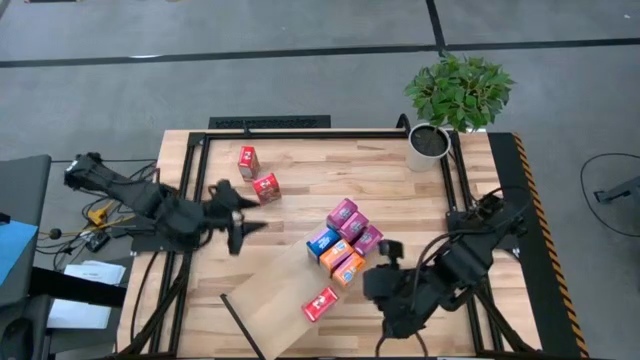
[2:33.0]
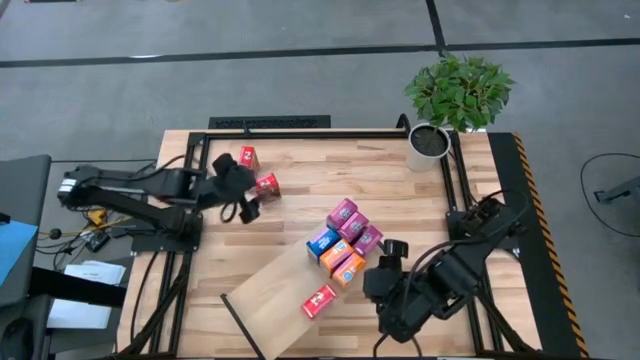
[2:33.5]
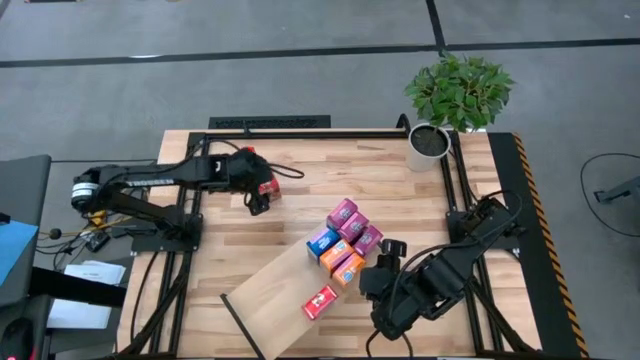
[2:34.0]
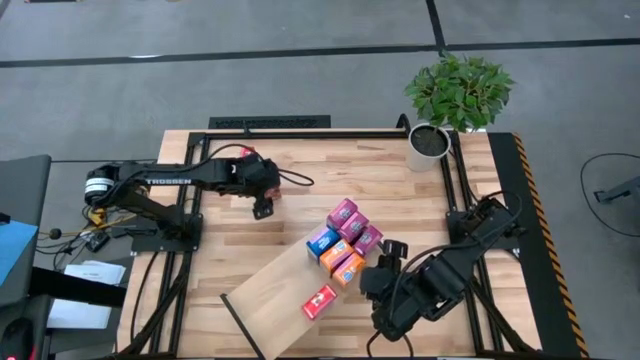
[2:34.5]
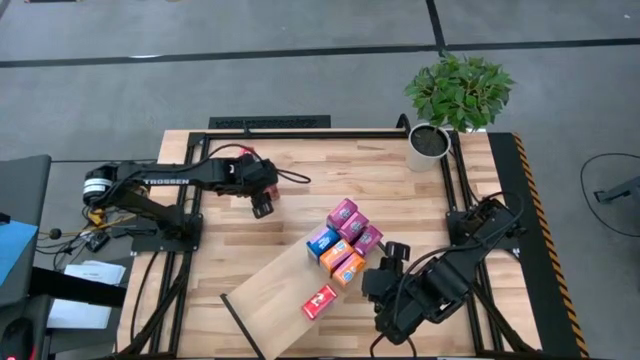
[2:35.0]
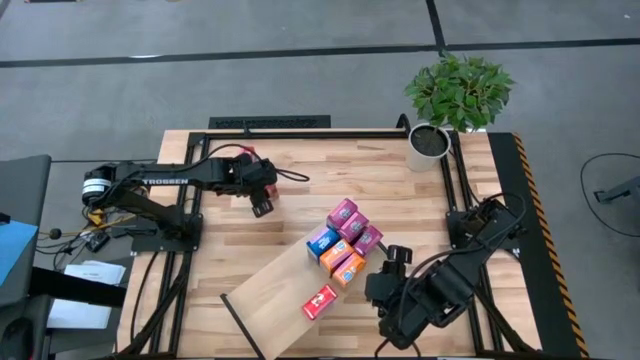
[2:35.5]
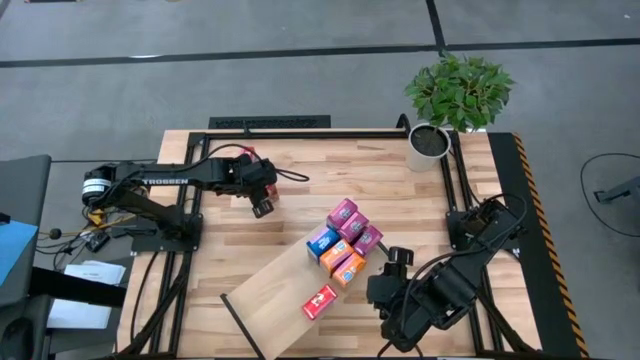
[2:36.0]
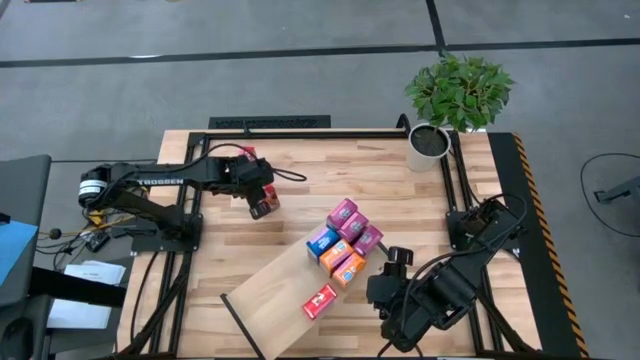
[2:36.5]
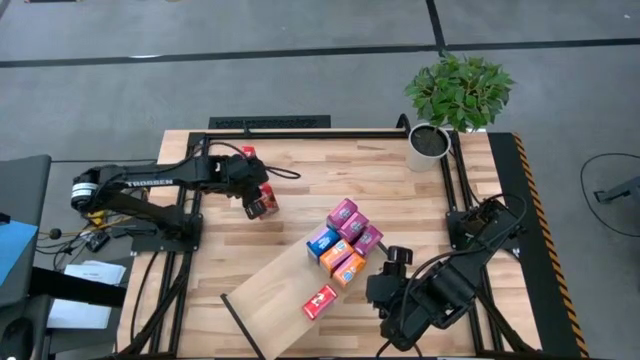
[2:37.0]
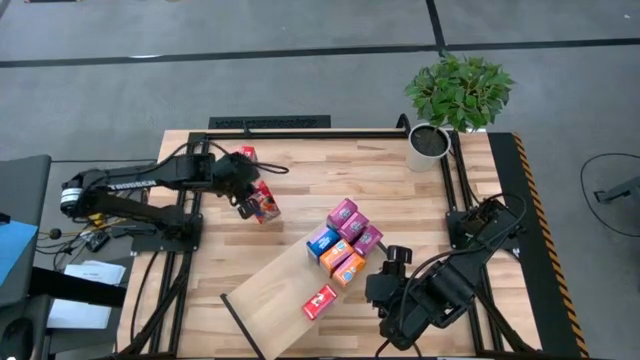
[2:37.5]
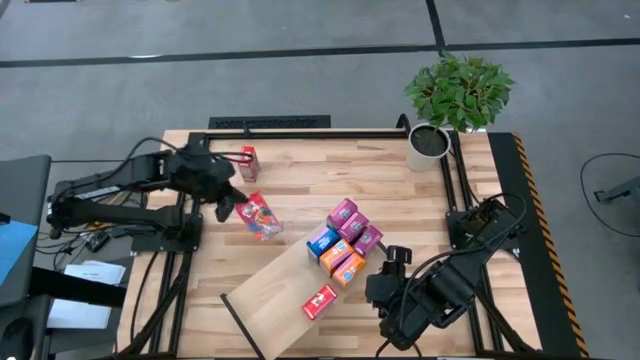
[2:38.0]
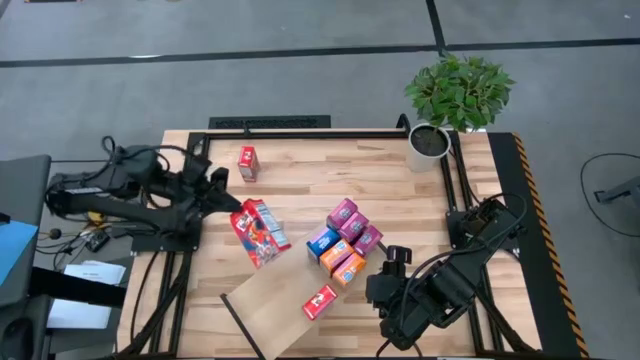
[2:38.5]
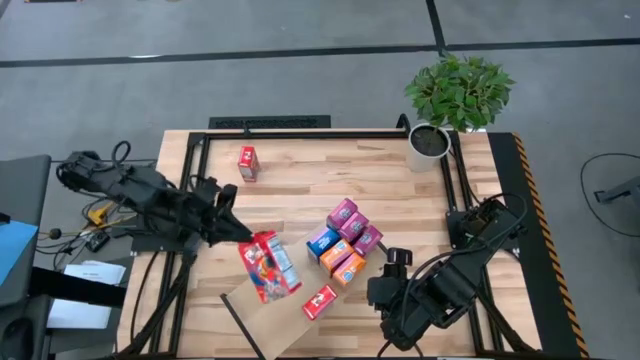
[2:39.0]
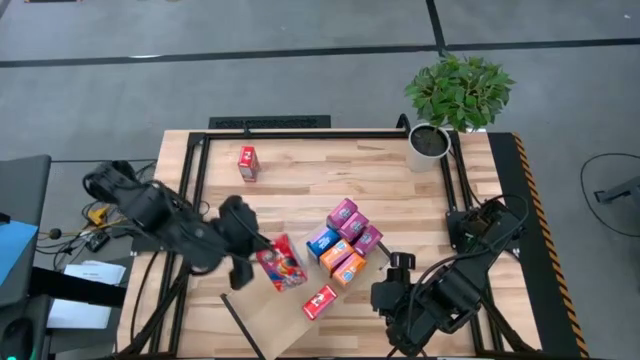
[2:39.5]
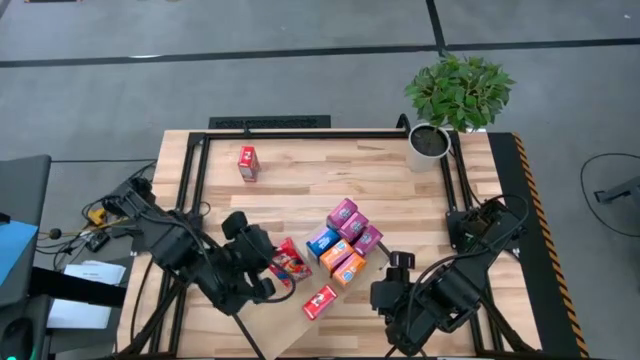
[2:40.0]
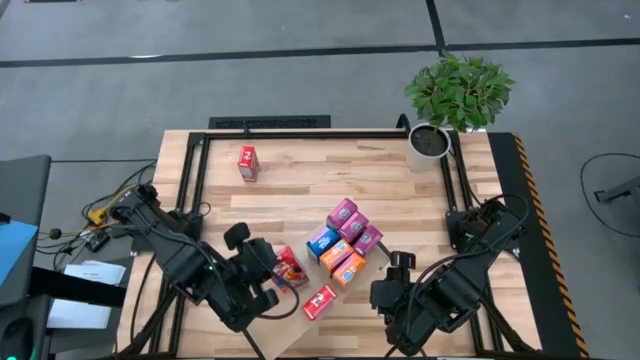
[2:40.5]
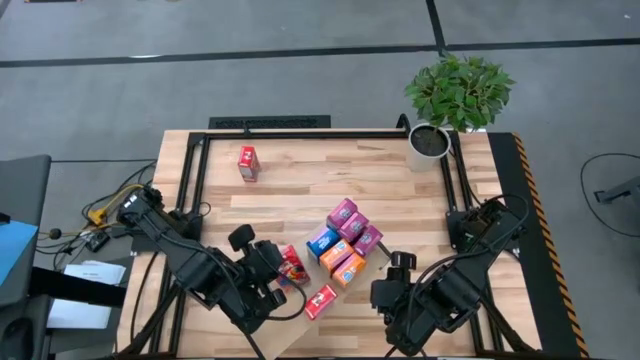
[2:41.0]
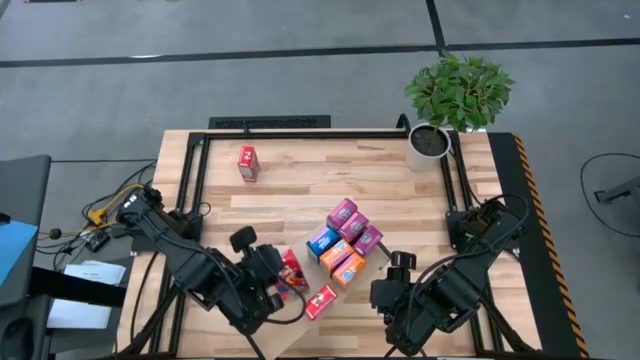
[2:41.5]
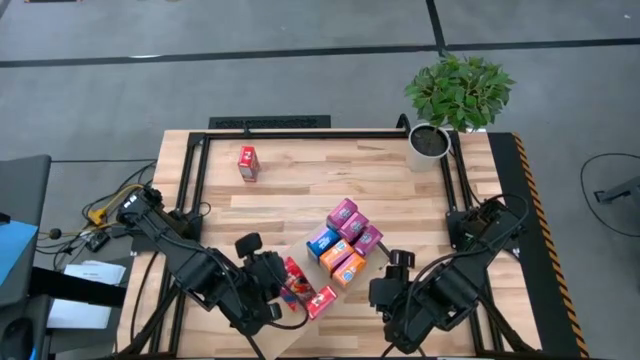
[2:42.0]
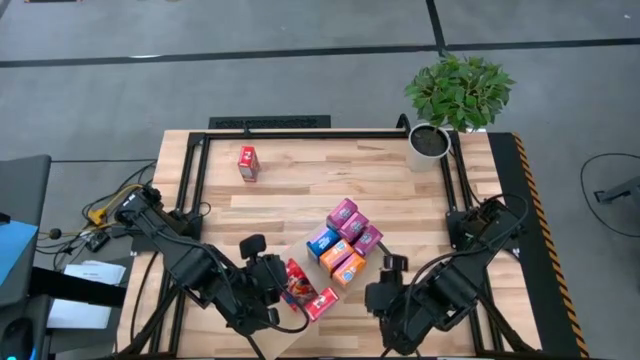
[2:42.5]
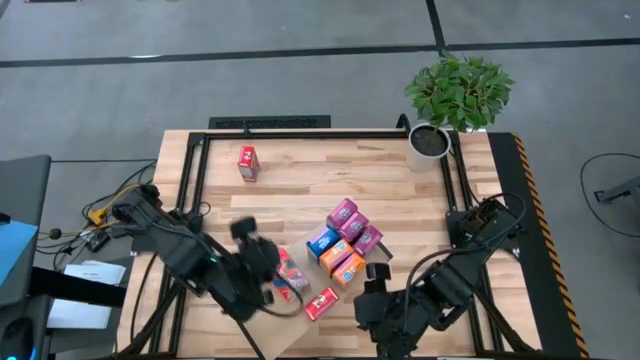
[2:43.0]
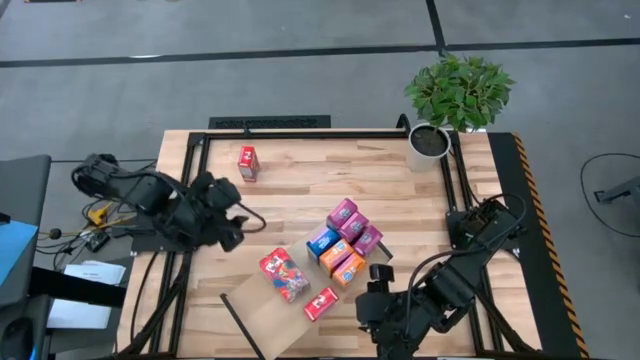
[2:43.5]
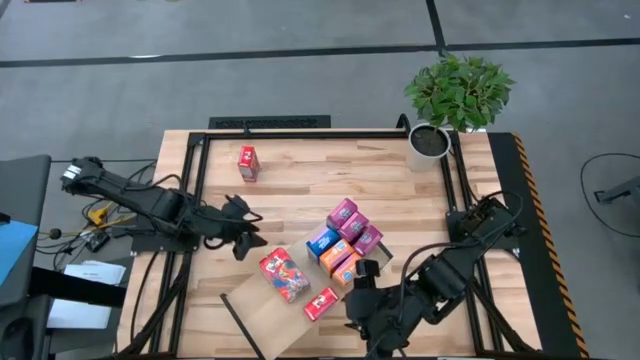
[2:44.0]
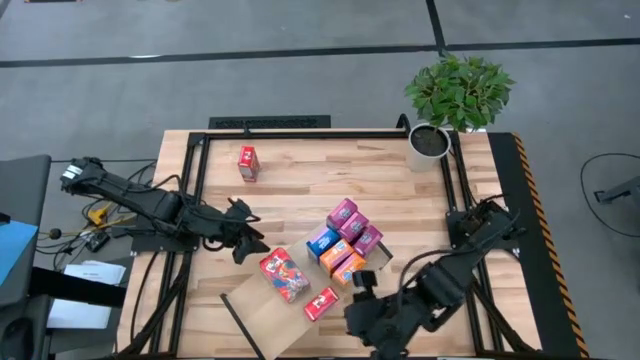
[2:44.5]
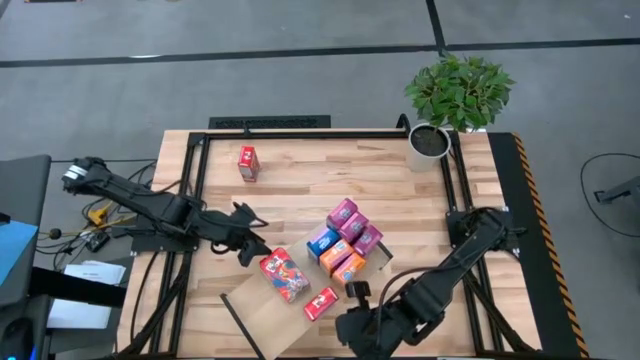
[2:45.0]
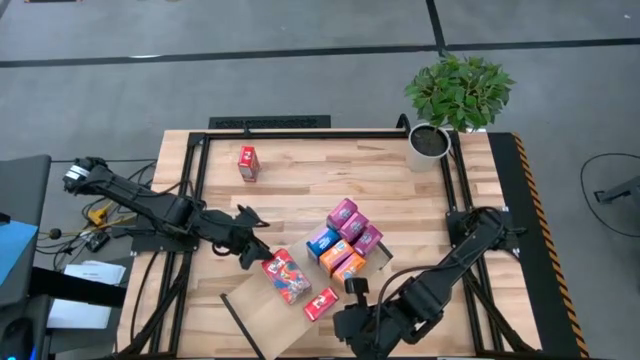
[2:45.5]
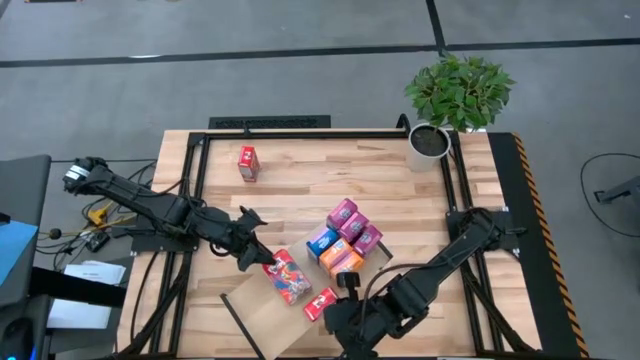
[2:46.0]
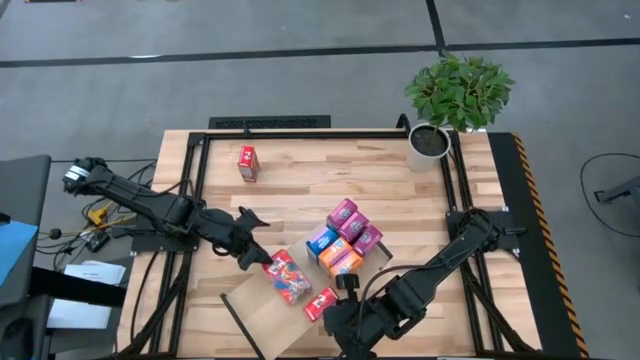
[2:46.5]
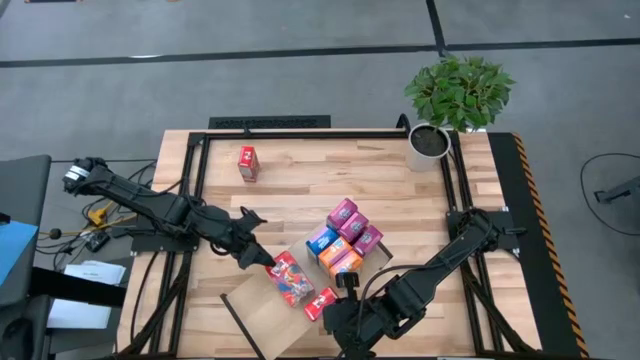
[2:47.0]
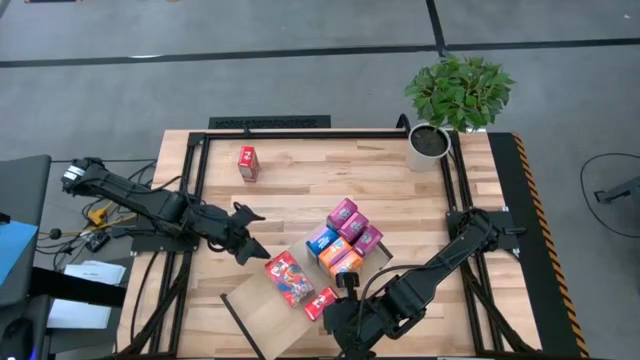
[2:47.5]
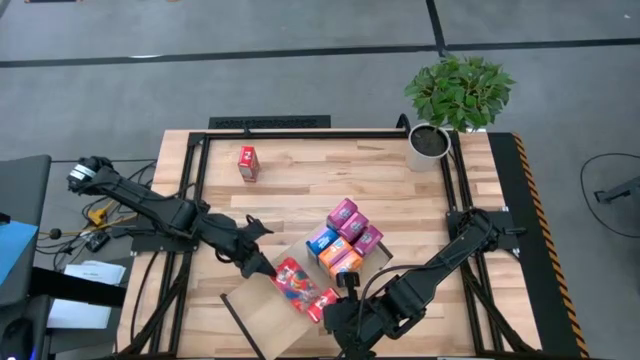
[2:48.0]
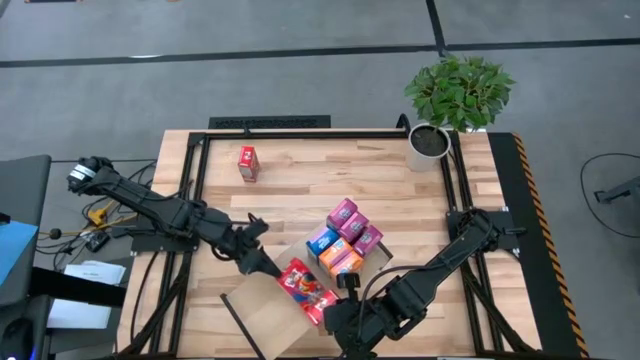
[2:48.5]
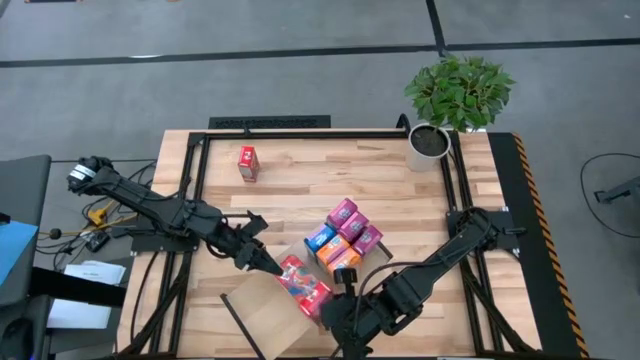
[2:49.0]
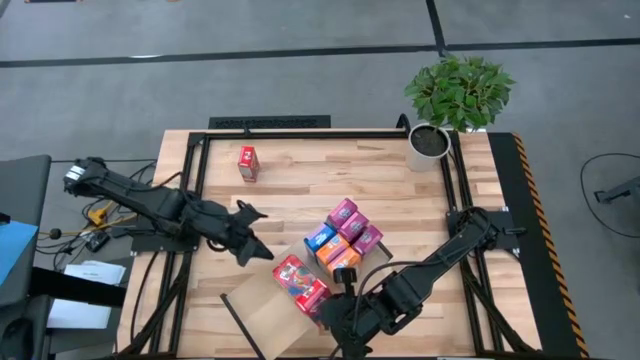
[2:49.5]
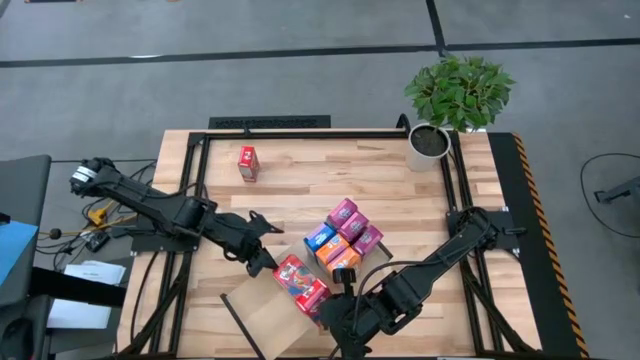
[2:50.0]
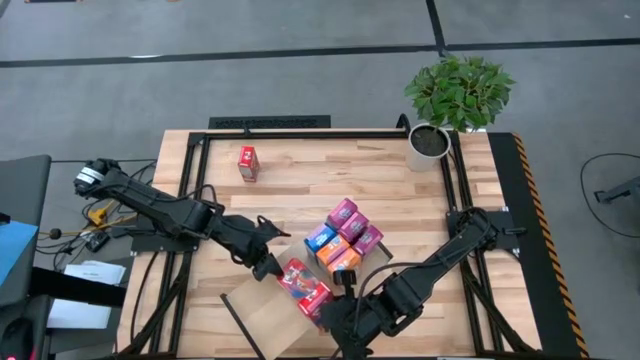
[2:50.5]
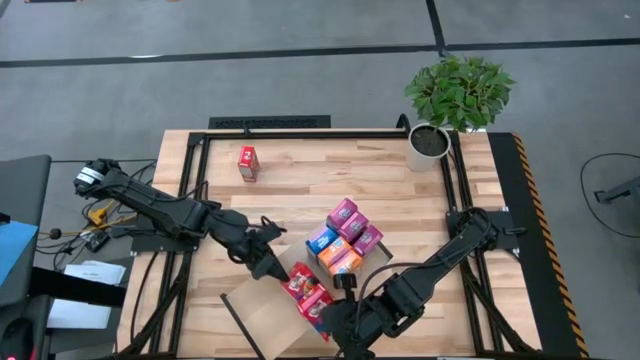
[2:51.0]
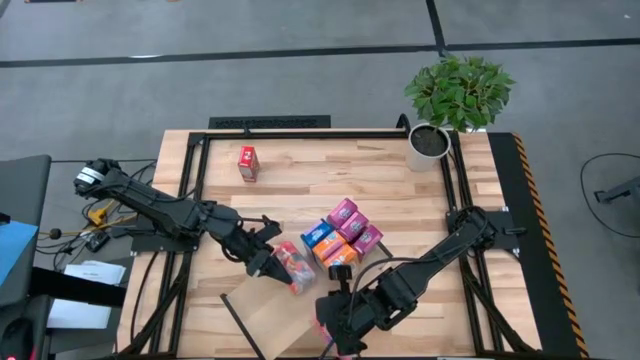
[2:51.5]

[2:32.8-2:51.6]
Task: Stack cereal on shelf
Put the right red cereal box onto the shelf
